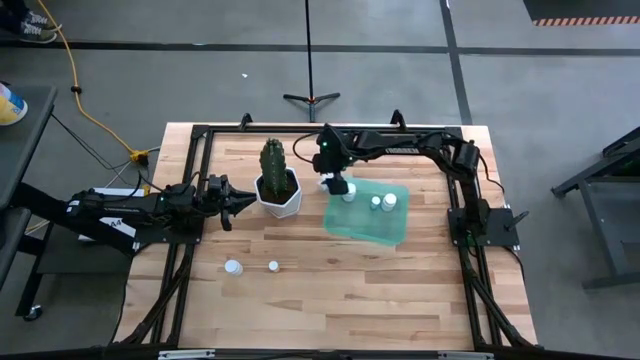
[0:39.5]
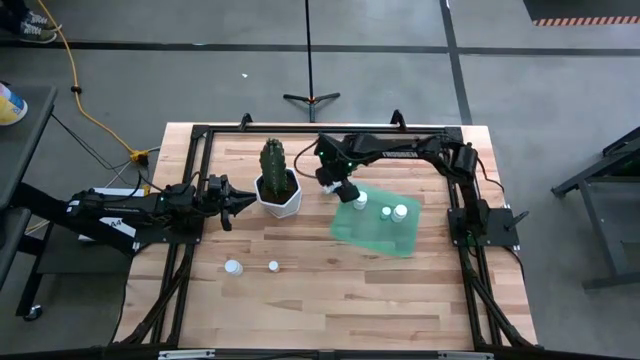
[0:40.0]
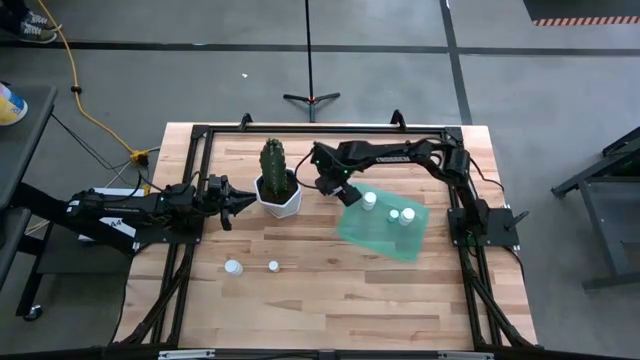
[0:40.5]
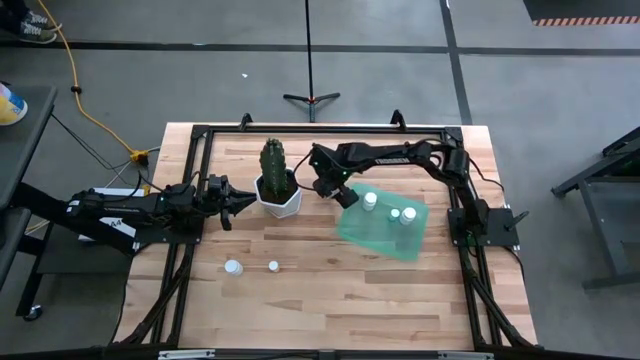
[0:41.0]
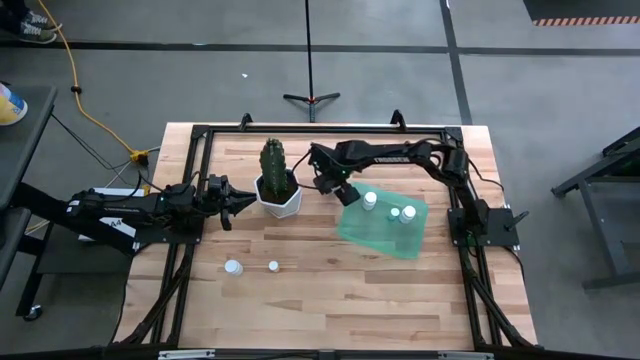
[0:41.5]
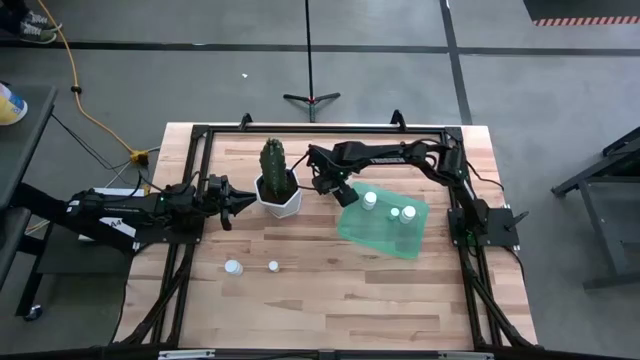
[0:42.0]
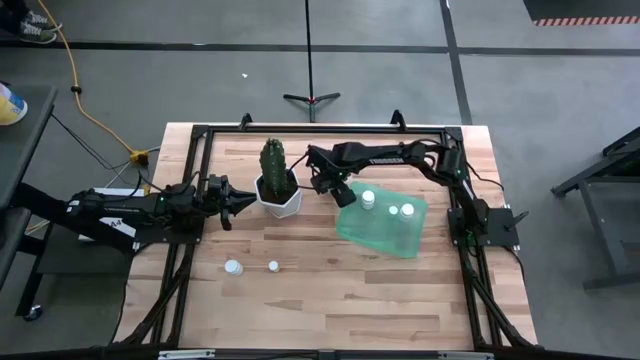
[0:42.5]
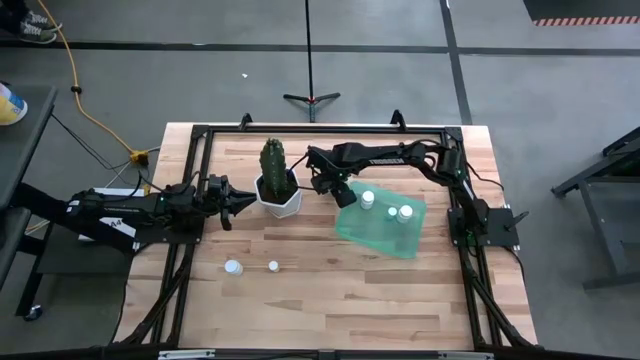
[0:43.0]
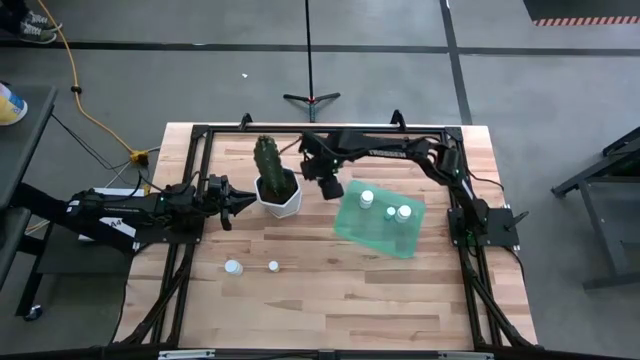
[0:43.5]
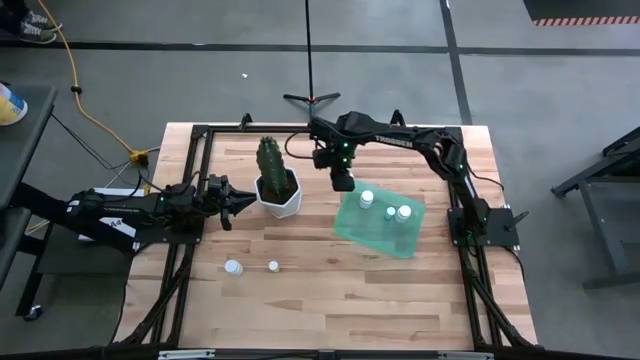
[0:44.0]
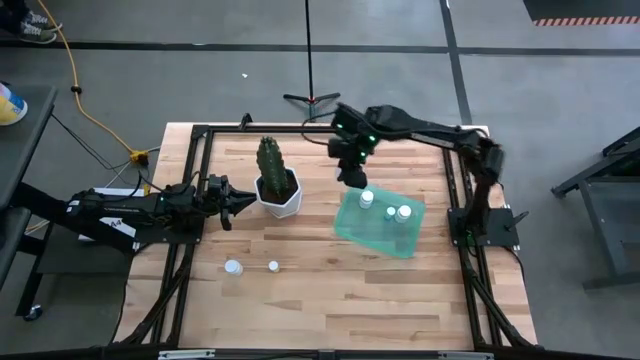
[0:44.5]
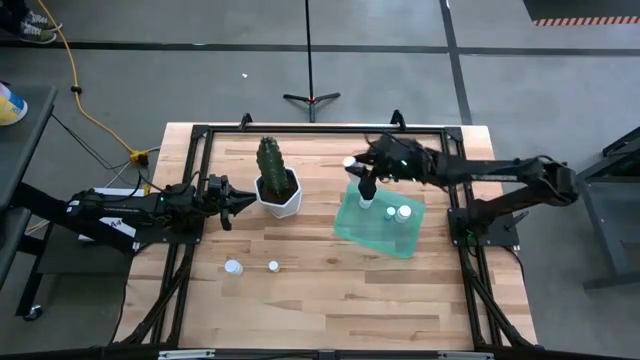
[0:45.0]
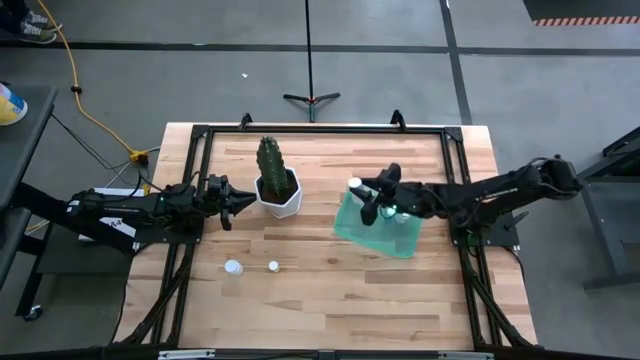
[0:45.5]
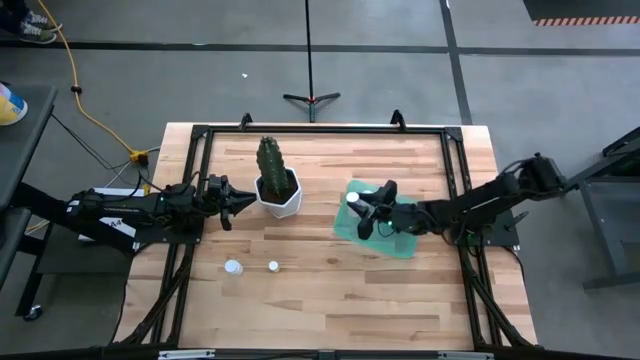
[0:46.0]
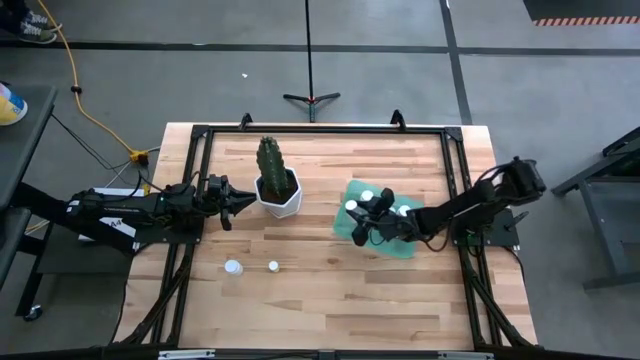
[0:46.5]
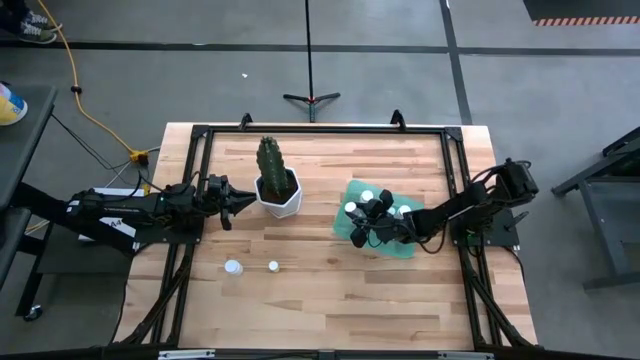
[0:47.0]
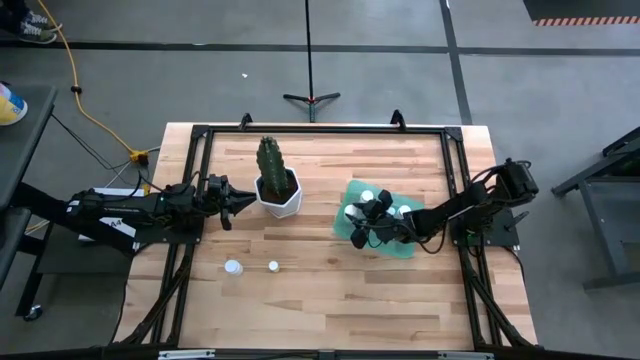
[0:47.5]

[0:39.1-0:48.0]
Task: Pick and place pill bottles into a basket
Put the white pill bottle into the light green bin

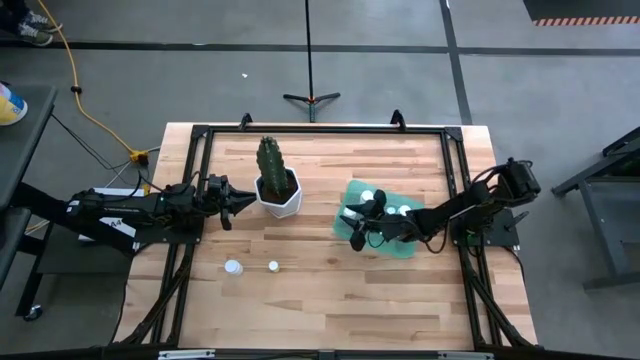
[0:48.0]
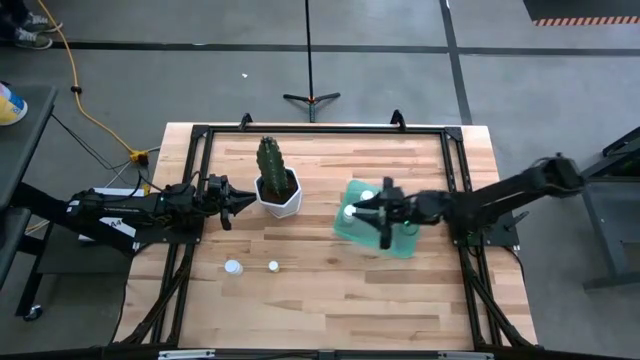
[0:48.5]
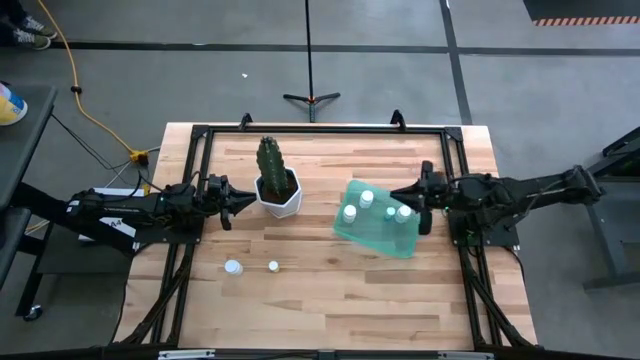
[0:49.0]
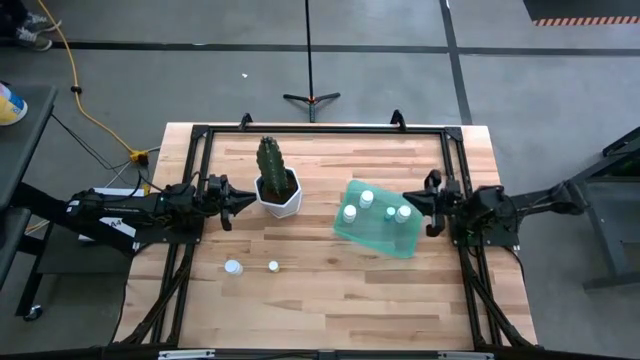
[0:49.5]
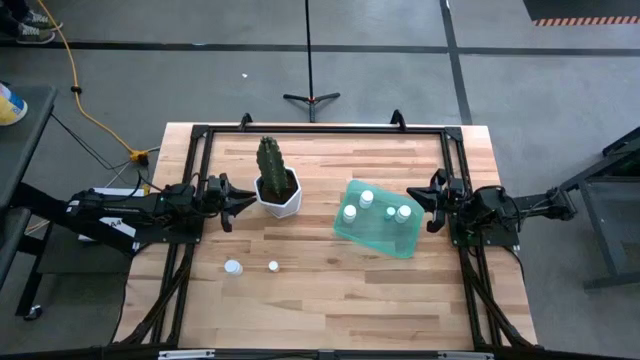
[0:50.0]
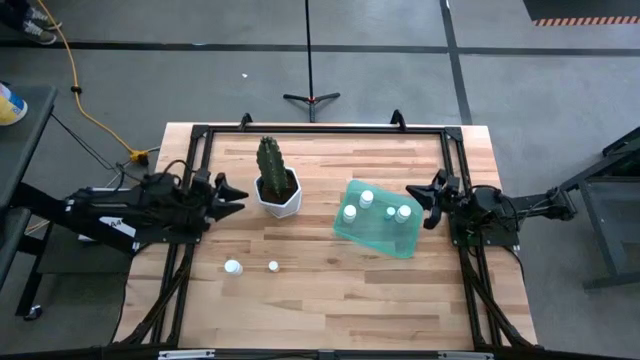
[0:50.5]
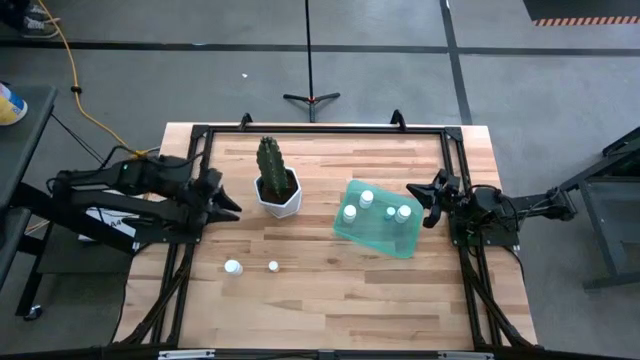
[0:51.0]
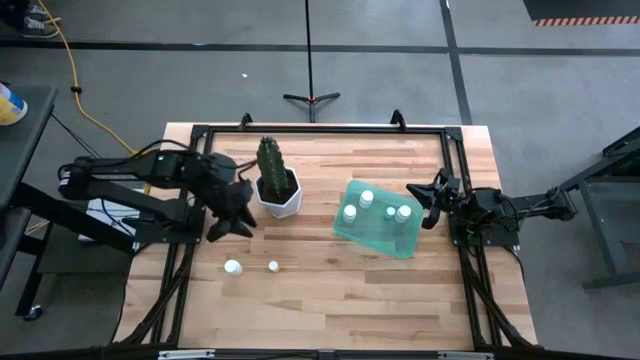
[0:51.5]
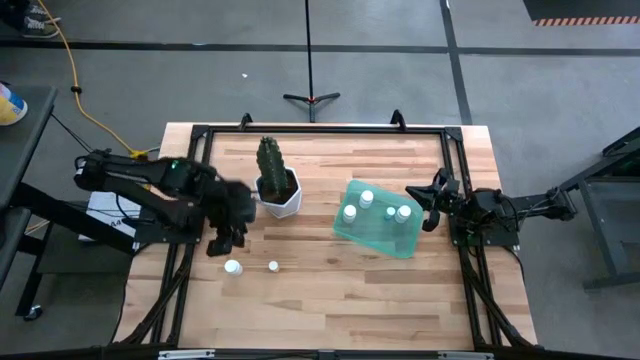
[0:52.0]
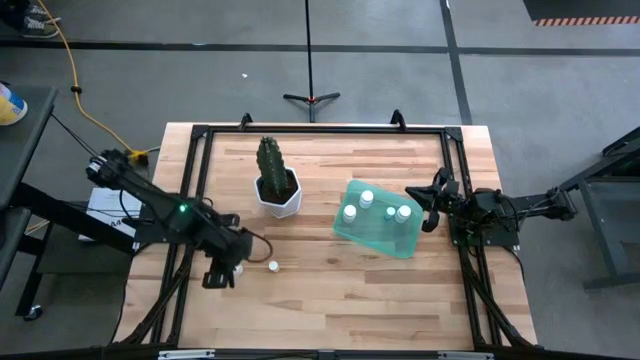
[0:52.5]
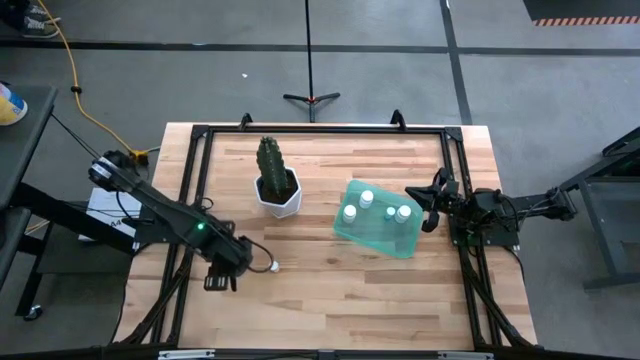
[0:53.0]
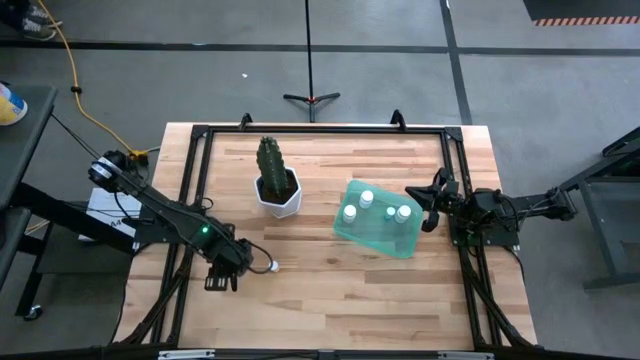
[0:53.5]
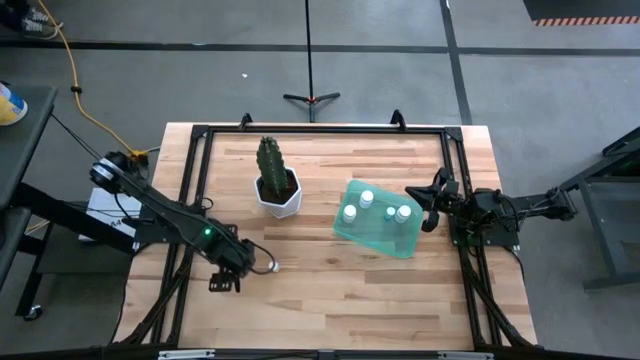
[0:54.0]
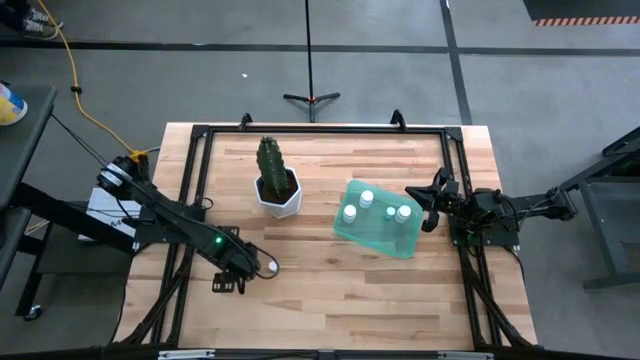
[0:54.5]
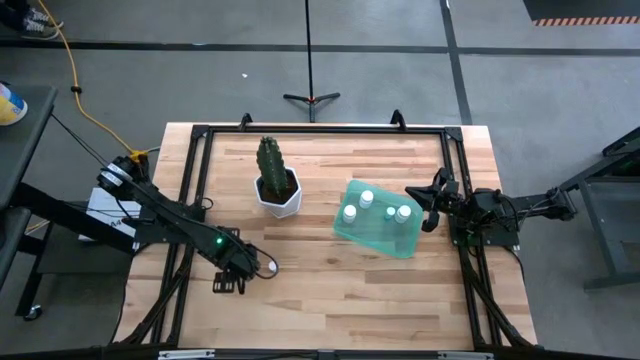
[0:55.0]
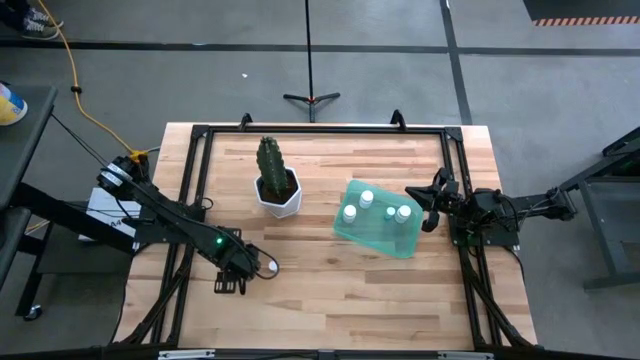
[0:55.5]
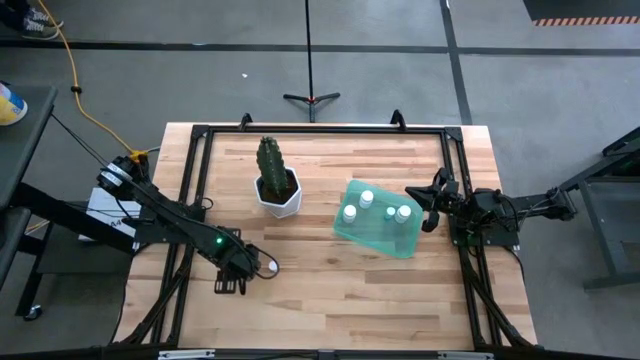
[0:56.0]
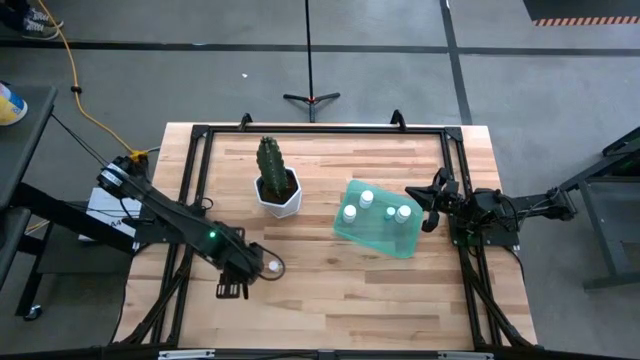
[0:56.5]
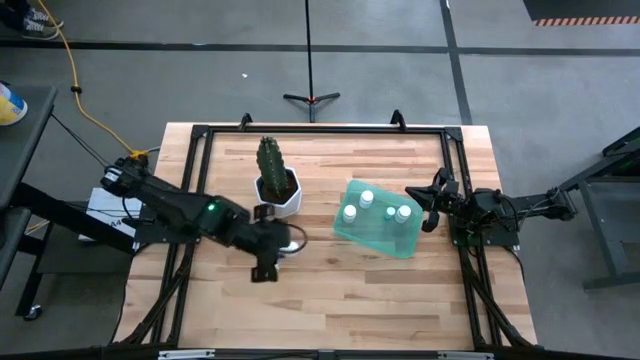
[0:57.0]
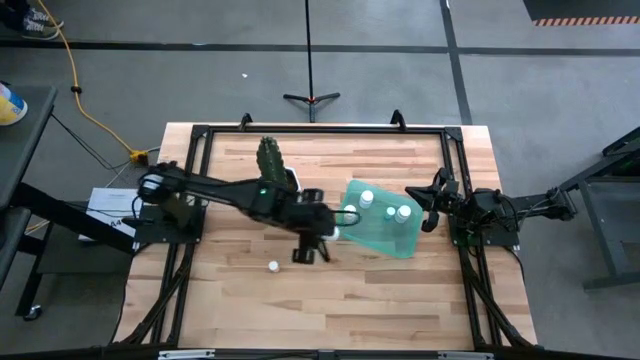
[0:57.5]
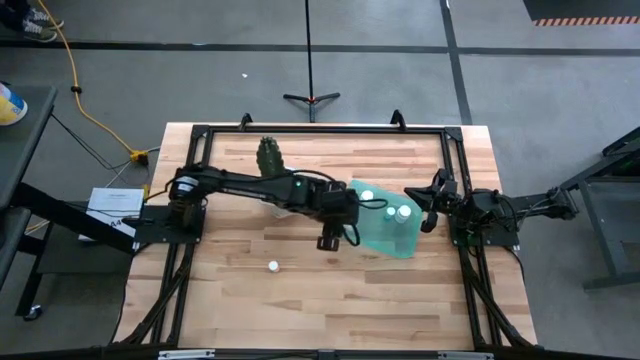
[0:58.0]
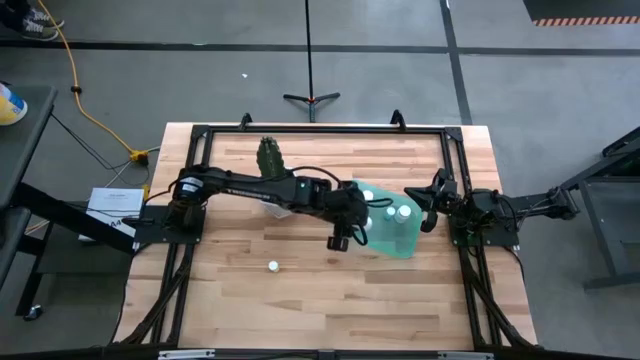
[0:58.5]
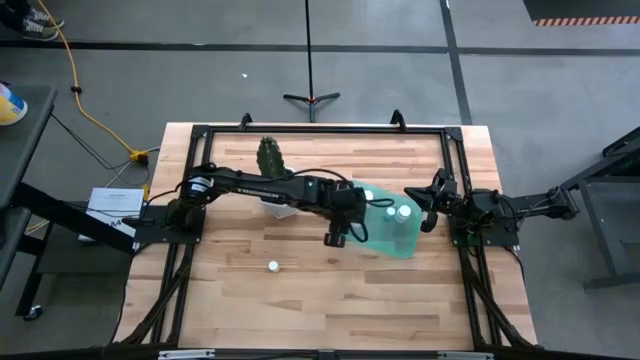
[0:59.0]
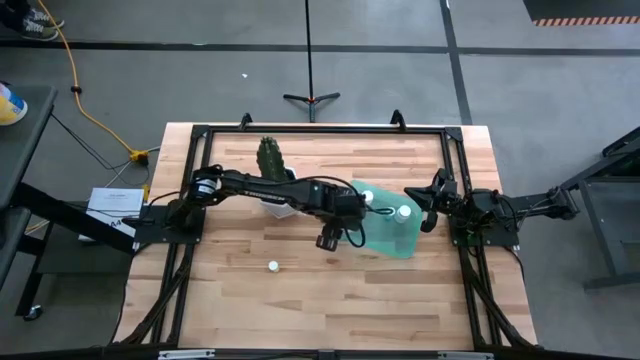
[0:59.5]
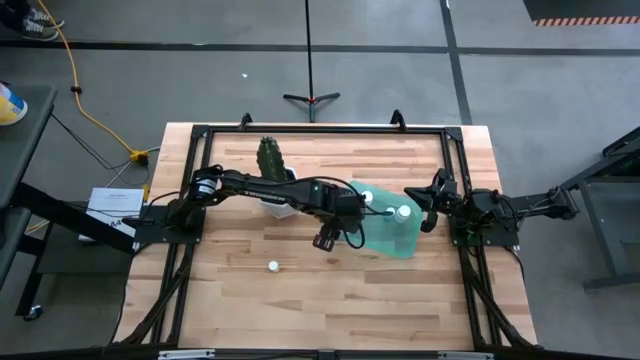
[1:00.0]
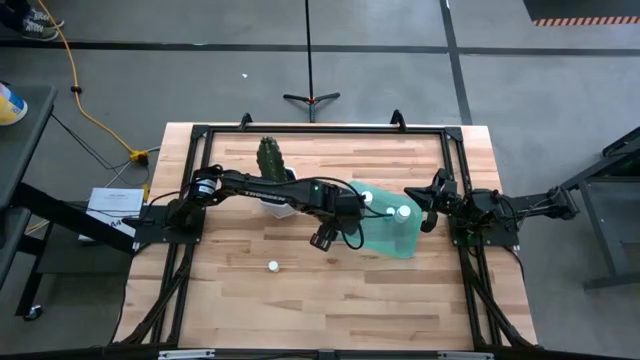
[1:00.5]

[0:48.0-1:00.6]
Put the white pill bottle into the light green bin
